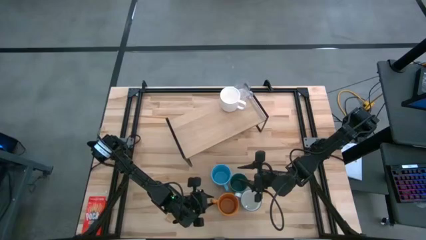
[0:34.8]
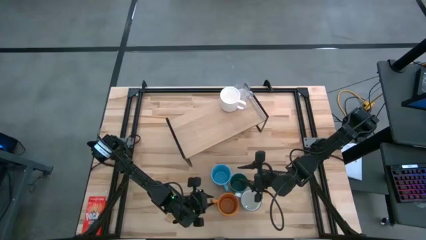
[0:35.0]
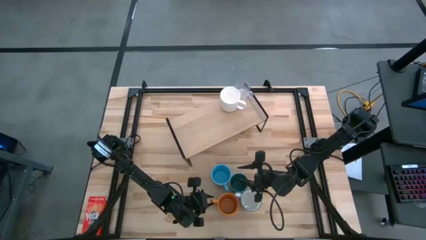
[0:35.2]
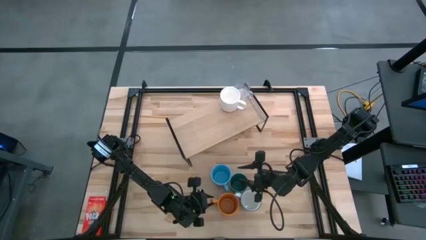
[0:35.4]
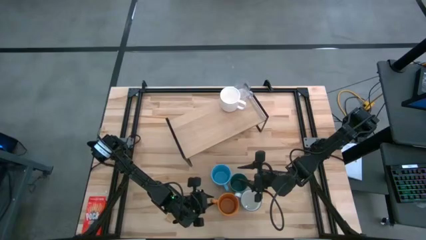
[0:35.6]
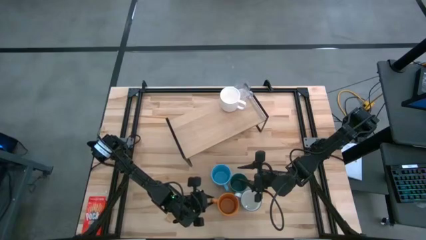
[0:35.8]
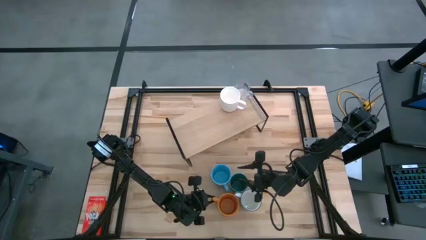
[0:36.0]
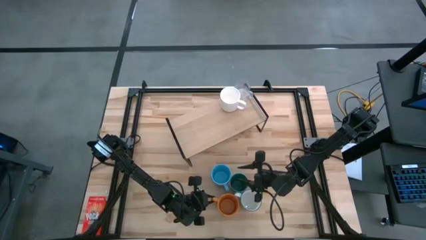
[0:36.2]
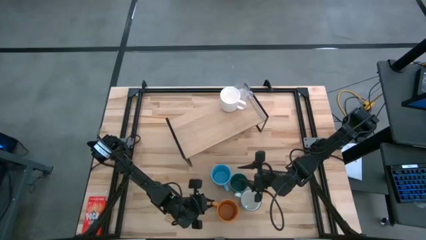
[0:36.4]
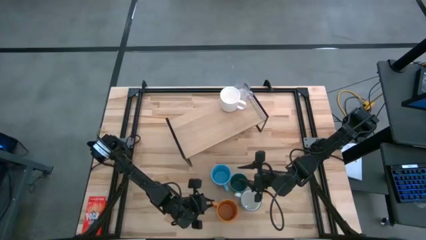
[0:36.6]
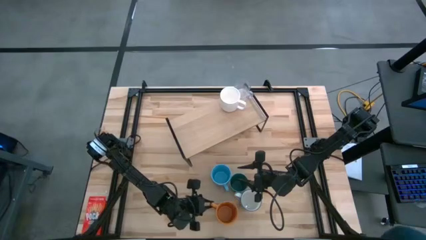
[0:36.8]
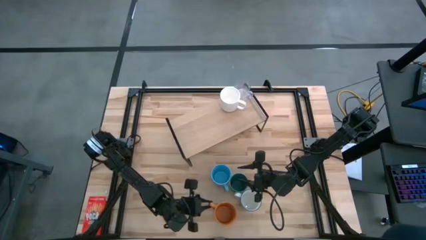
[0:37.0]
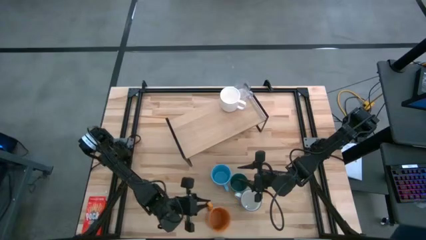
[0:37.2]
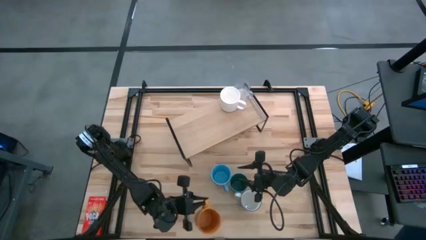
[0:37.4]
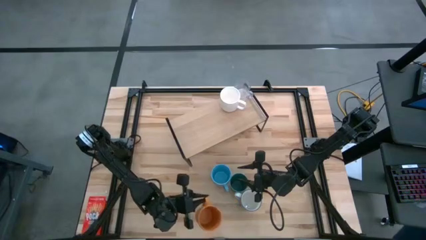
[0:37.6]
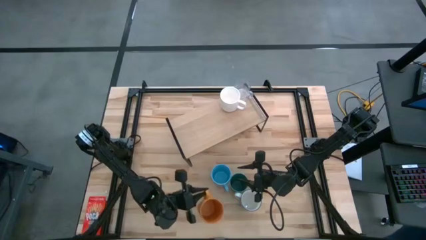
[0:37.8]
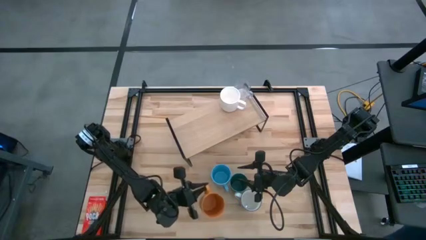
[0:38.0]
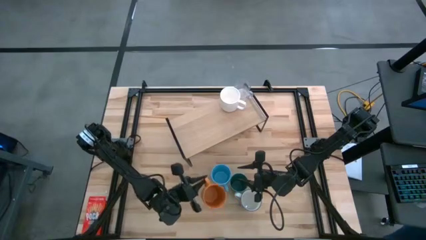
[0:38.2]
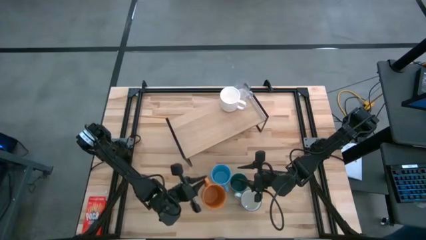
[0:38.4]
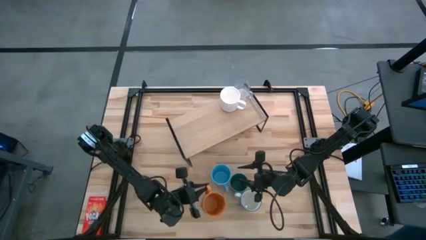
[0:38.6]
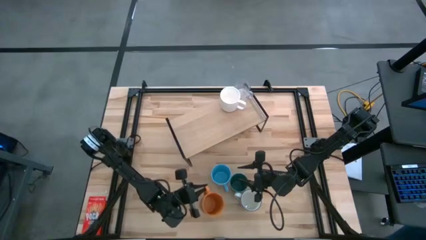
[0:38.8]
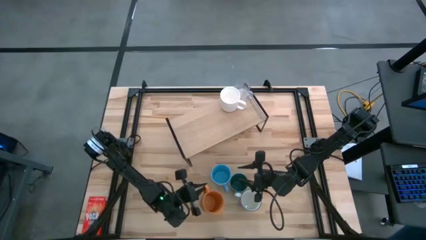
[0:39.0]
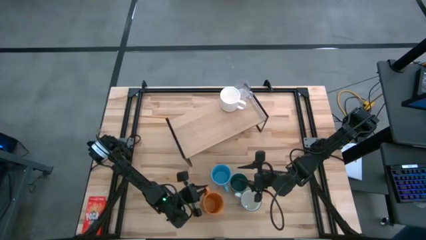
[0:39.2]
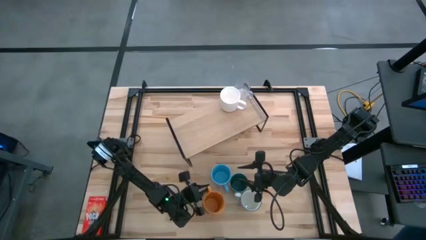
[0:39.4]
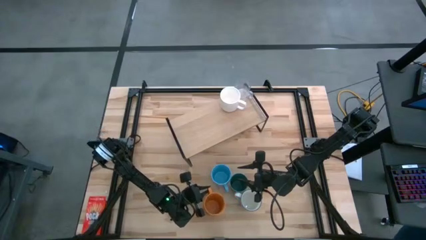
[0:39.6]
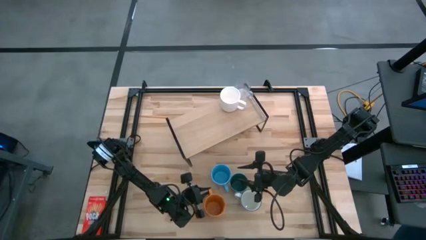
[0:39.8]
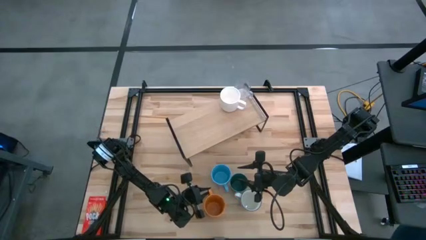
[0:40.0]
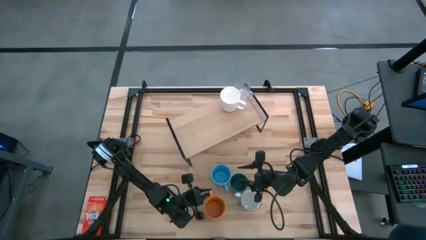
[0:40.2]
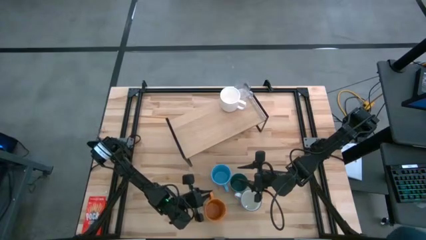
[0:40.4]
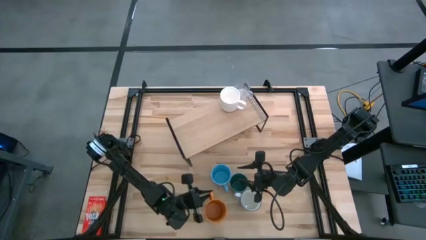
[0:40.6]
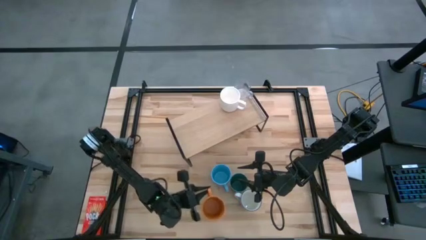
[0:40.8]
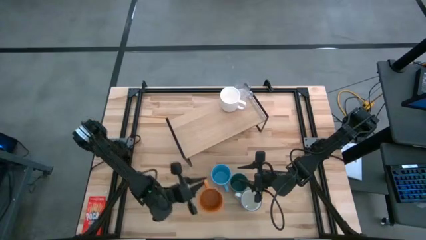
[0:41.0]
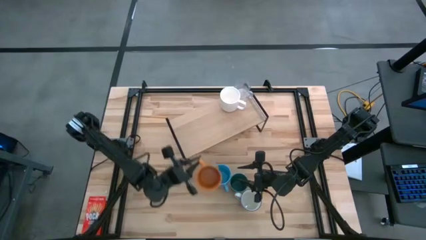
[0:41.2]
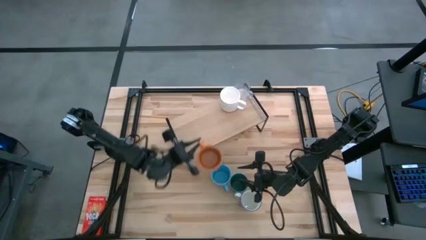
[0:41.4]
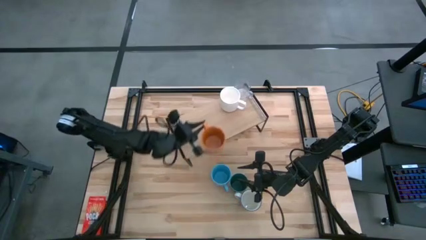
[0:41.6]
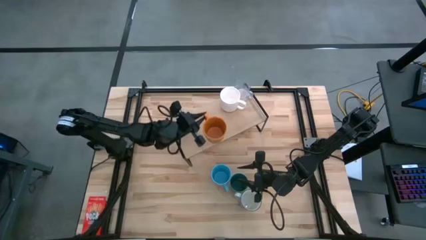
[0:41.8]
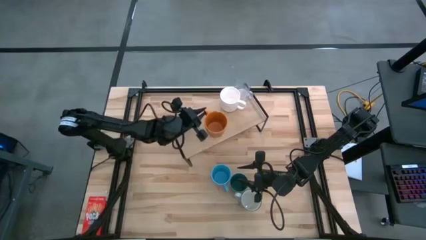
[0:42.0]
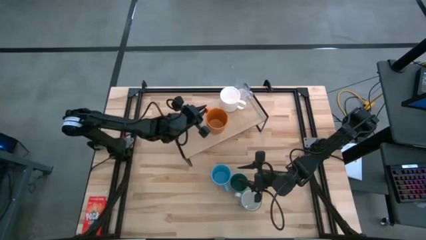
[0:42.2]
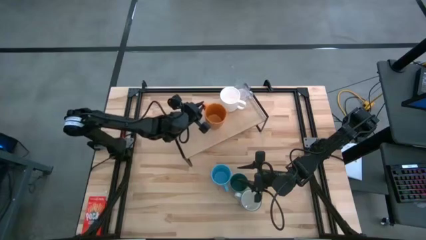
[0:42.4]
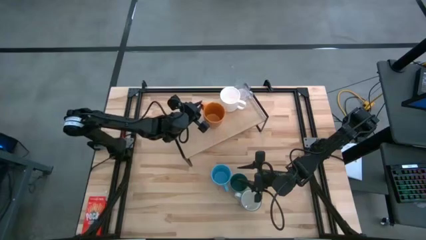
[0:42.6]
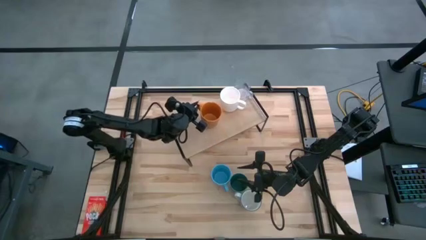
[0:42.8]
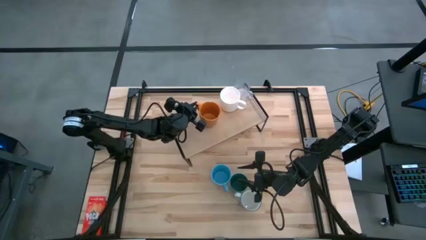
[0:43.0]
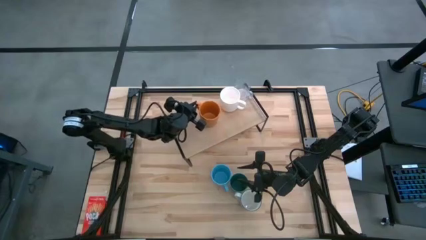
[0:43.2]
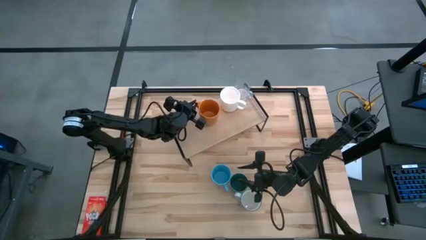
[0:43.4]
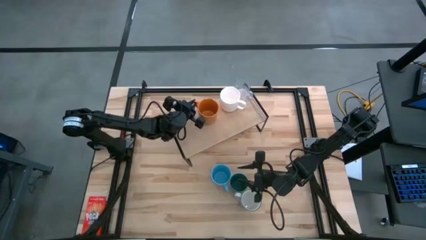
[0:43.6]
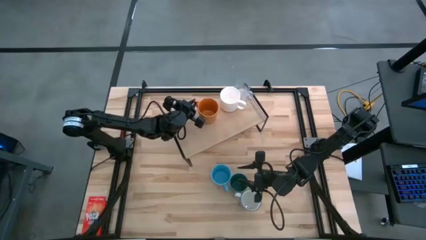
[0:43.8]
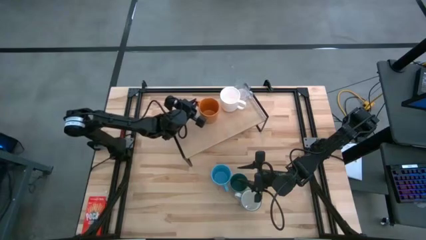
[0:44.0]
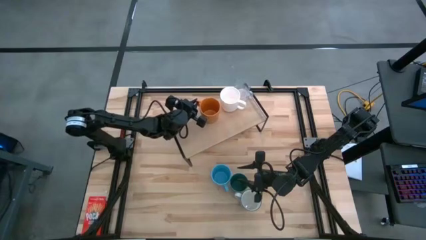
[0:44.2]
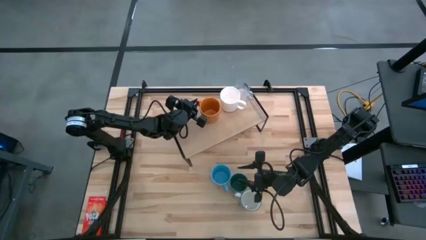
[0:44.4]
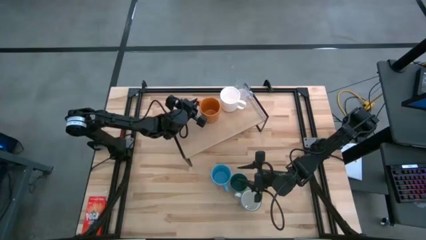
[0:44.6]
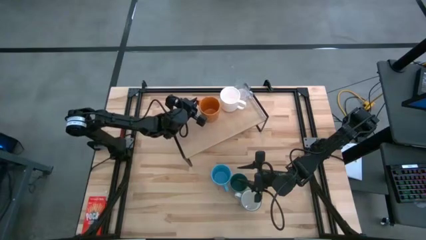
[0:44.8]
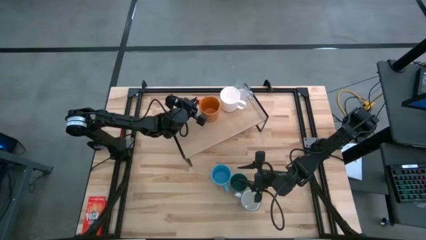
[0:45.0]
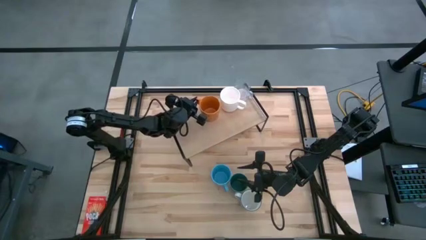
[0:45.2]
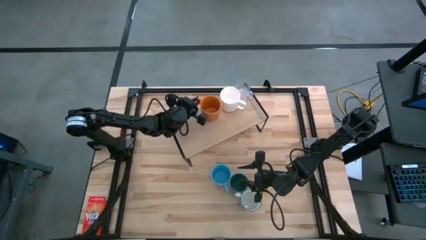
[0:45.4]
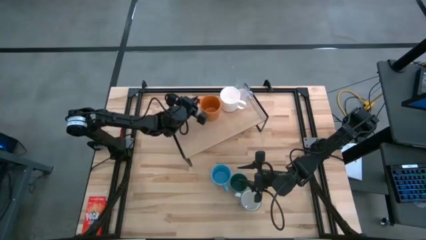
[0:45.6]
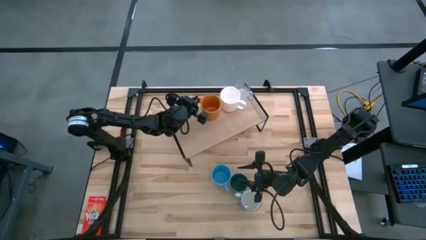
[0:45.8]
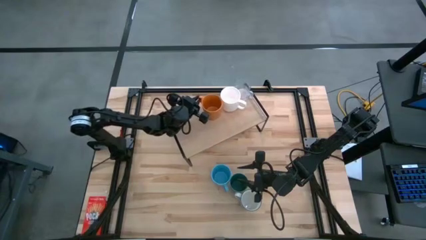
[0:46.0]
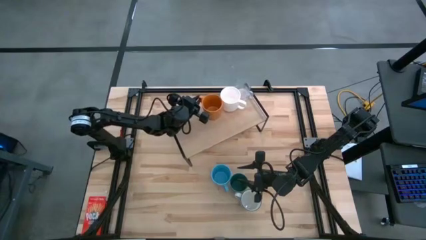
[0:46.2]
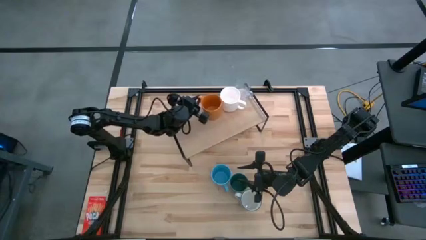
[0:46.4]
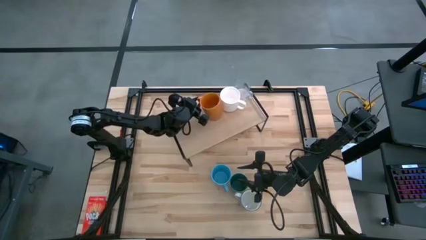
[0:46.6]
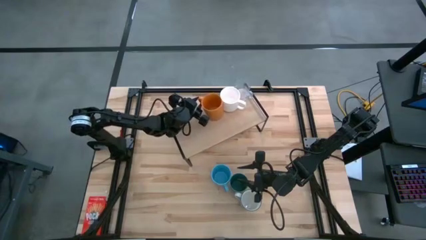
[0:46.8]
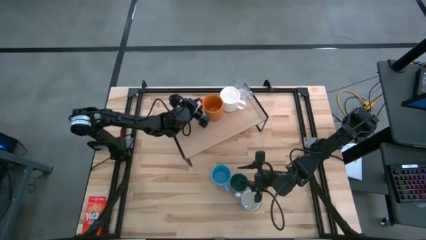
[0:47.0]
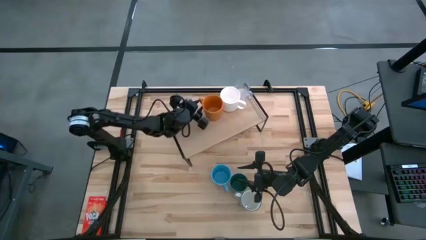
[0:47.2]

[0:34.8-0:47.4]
Task: Stack small to large cups/mugs on shelf
Put the orange mug on the shelf

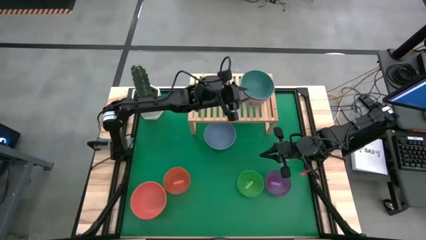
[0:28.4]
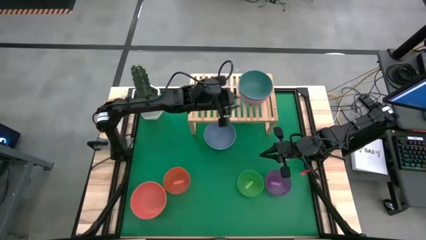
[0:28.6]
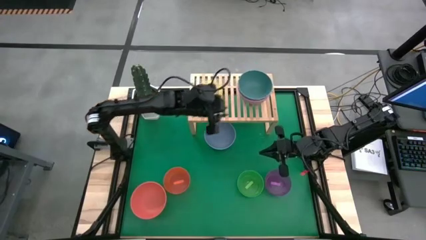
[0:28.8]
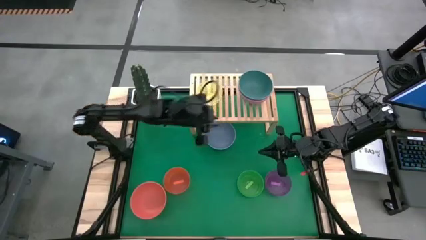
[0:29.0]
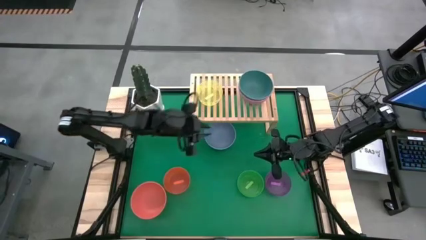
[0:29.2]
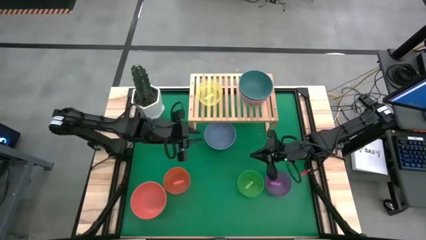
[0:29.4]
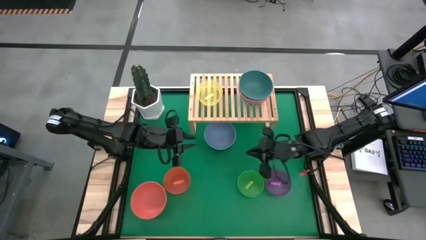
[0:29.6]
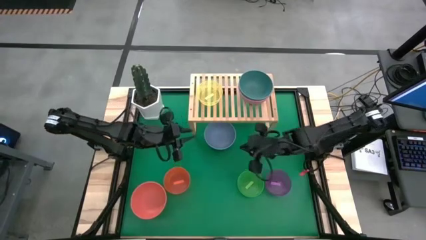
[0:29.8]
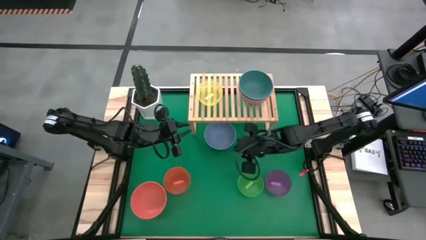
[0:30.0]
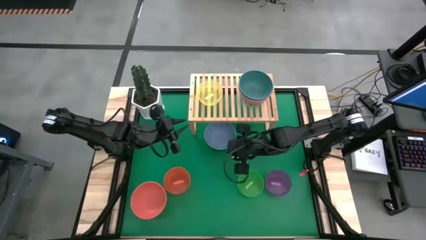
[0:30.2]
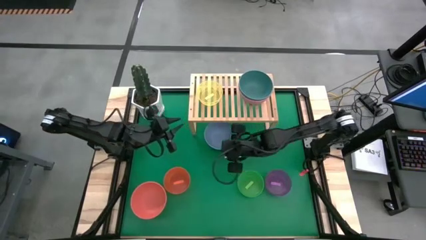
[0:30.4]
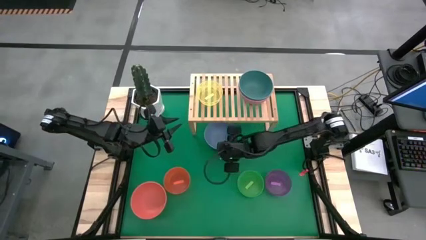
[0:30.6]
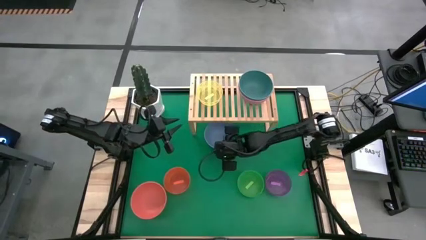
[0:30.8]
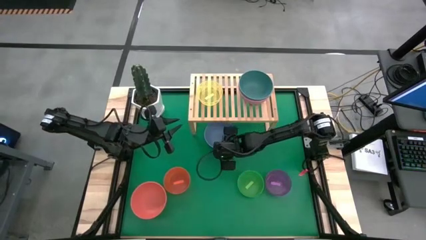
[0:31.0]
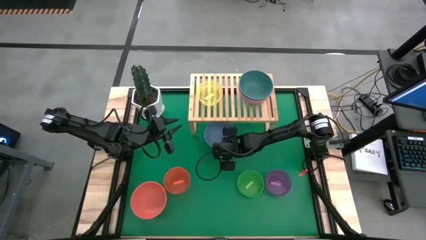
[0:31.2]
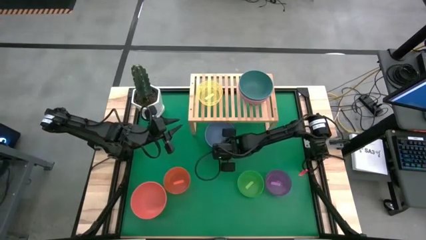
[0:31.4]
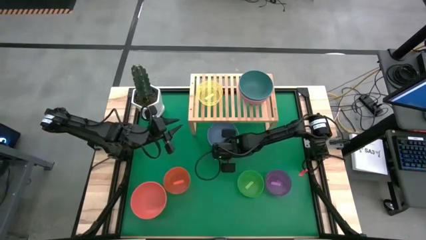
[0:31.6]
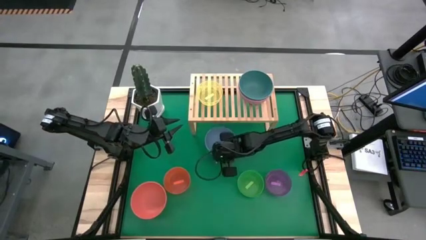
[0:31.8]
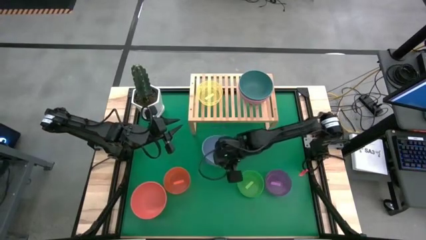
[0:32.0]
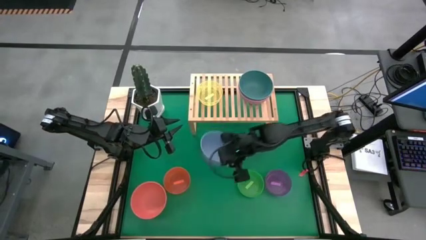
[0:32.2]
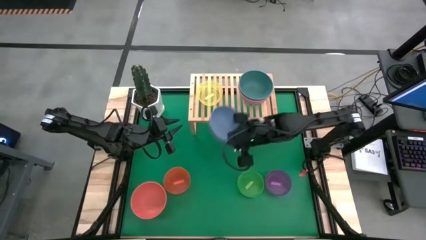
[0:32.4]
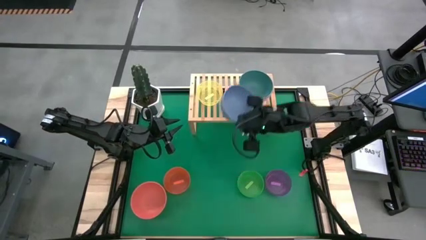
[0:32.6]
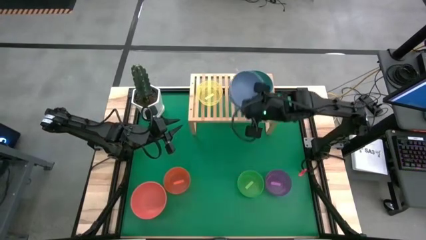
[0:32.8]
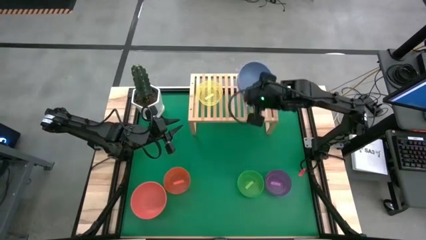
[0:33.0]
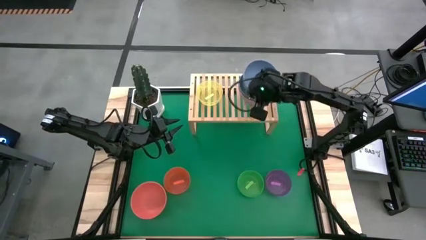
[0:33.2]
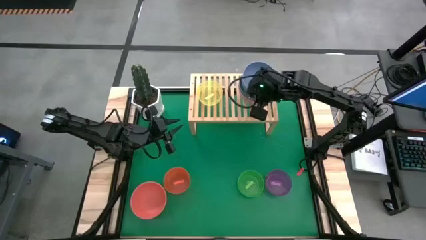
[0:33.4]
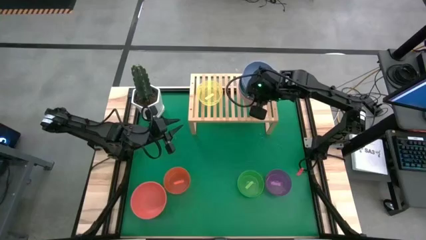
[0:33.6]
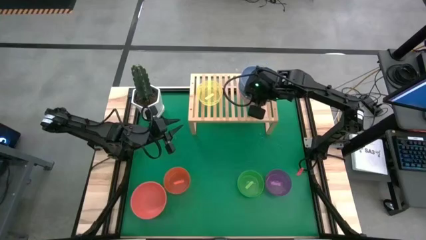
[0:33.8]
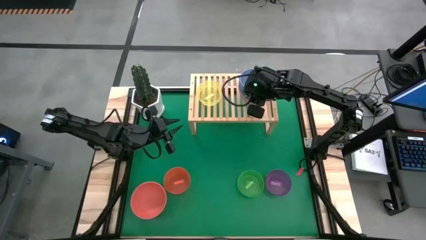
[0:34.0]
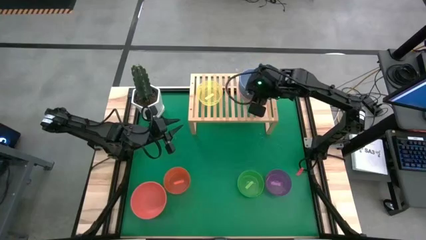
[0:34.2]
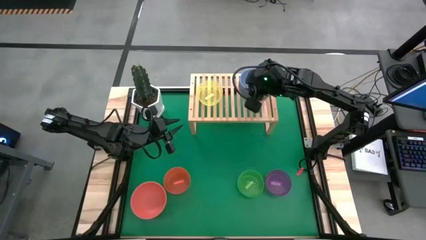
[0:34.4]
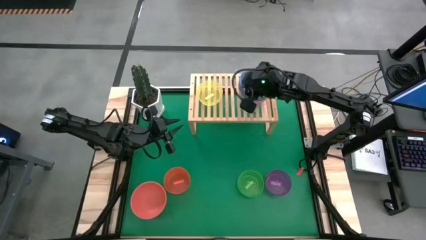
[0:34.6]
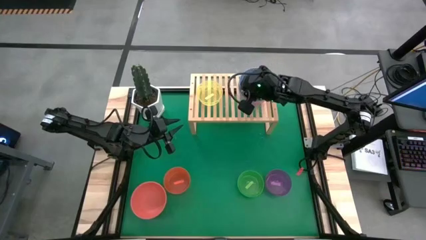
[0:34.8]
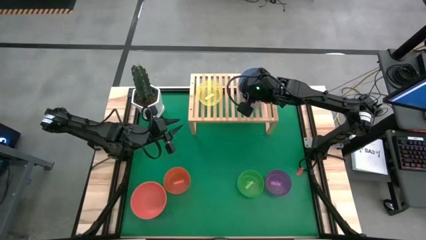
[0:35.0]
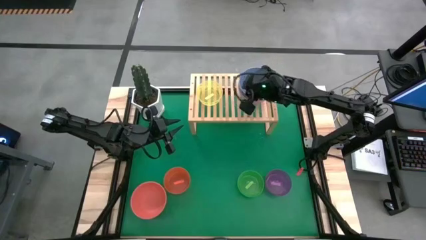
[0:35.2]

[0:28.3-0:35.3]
Task: Place and stack bowls onto a shelf
Stack the light blue bowl on top of the dark green bowl on the shelf
